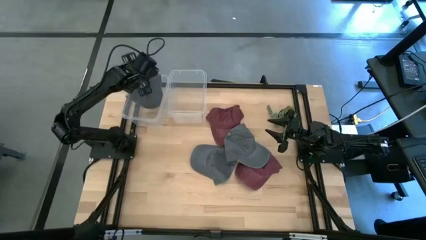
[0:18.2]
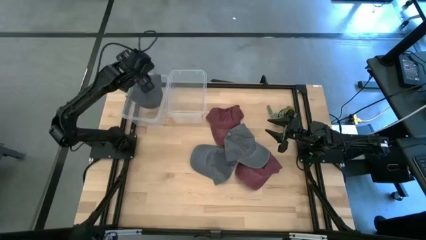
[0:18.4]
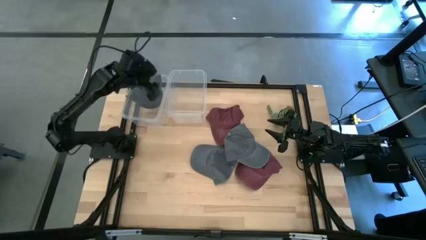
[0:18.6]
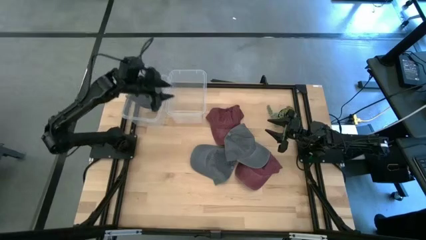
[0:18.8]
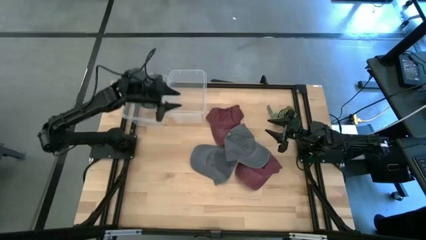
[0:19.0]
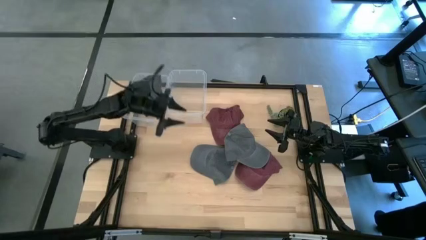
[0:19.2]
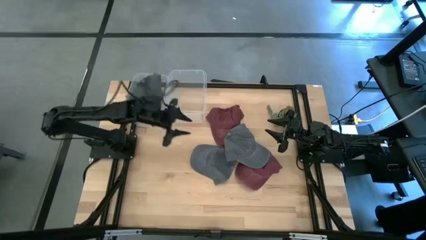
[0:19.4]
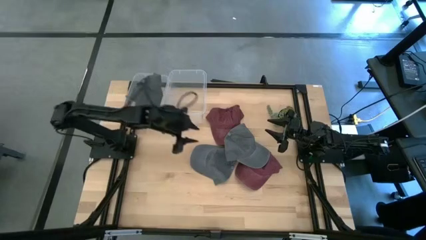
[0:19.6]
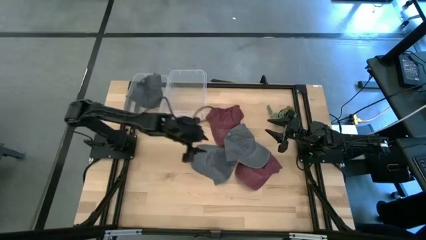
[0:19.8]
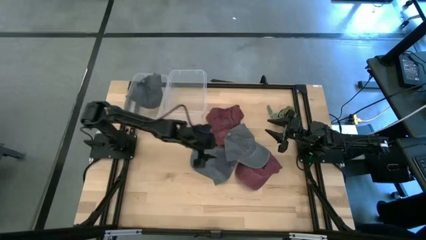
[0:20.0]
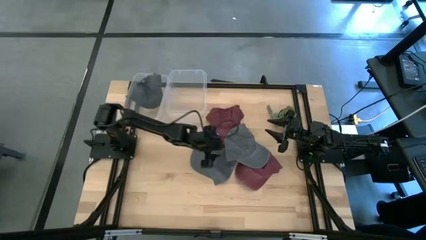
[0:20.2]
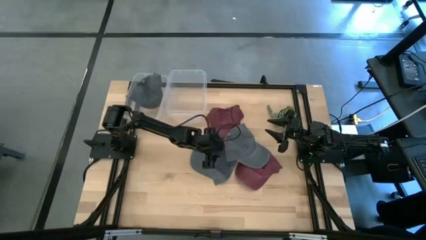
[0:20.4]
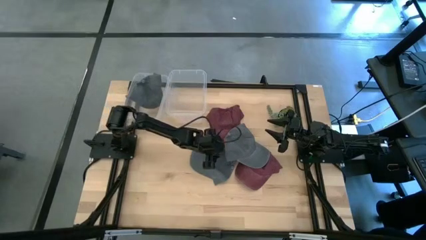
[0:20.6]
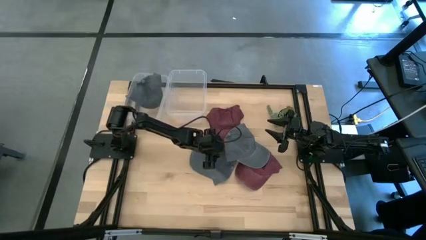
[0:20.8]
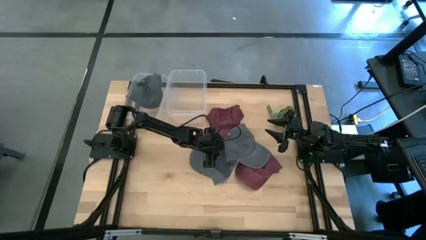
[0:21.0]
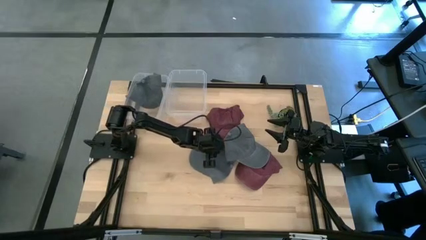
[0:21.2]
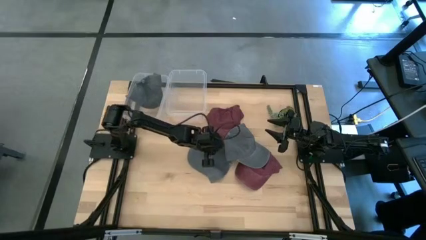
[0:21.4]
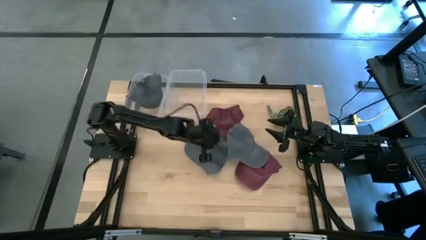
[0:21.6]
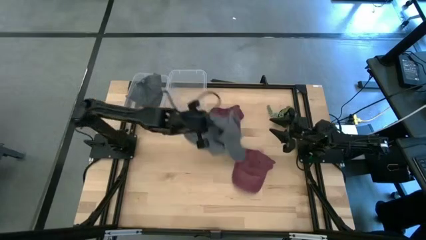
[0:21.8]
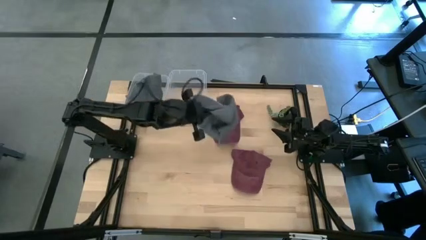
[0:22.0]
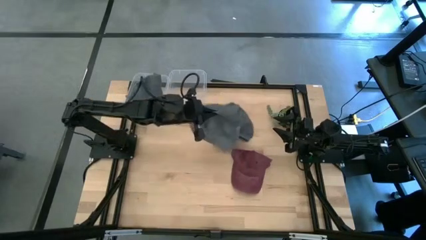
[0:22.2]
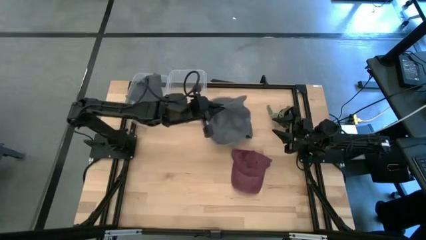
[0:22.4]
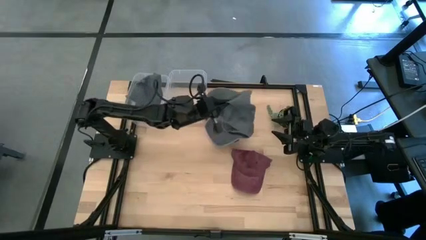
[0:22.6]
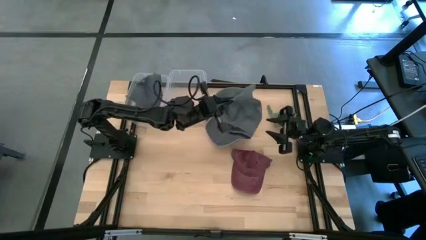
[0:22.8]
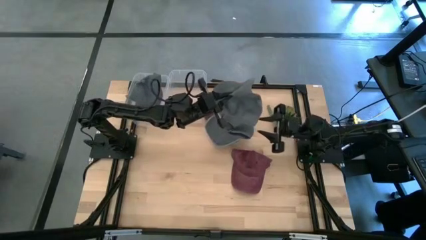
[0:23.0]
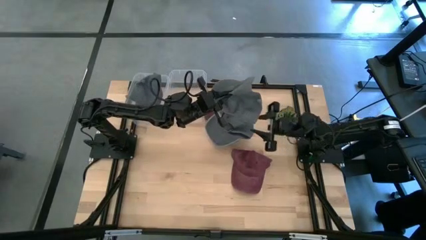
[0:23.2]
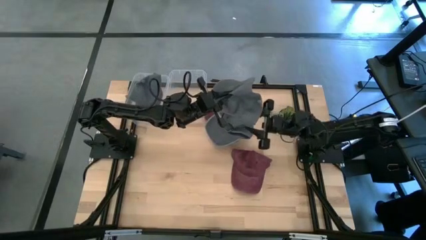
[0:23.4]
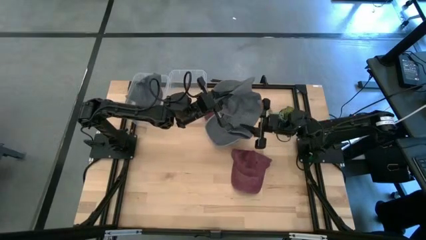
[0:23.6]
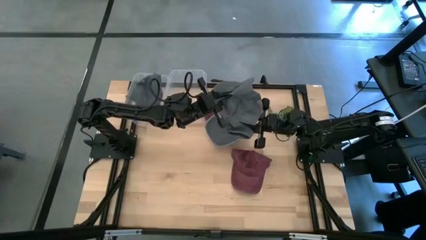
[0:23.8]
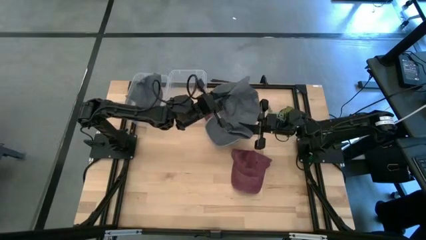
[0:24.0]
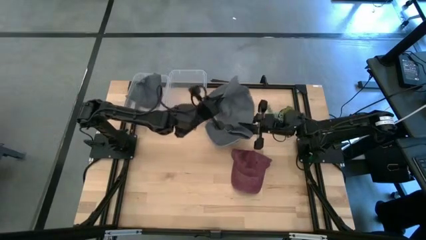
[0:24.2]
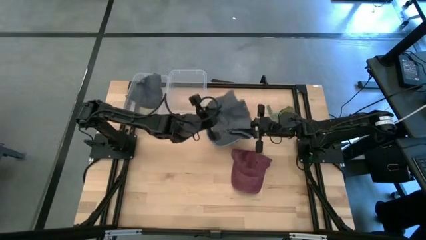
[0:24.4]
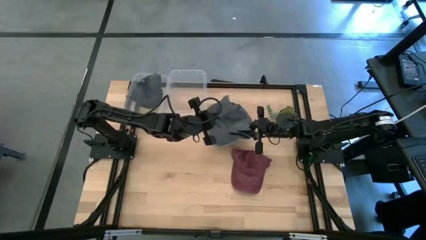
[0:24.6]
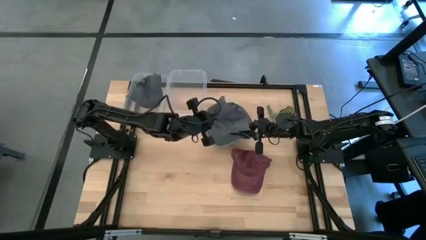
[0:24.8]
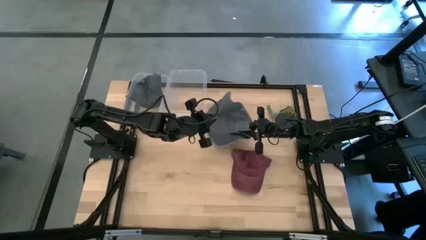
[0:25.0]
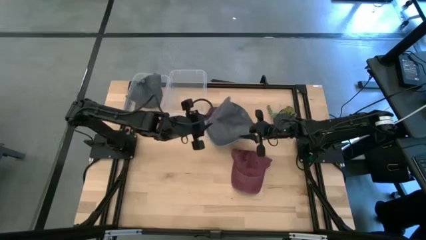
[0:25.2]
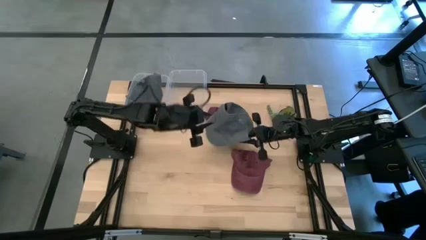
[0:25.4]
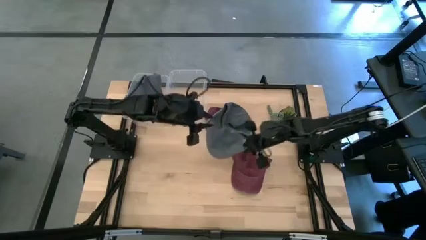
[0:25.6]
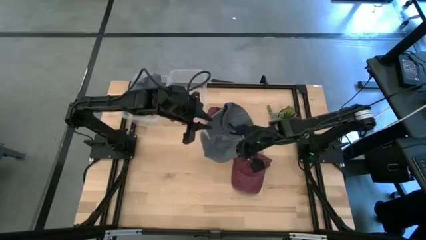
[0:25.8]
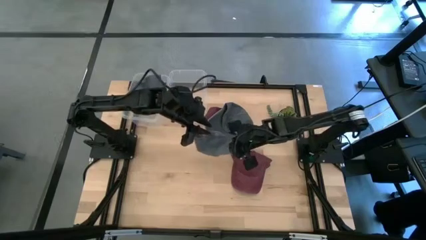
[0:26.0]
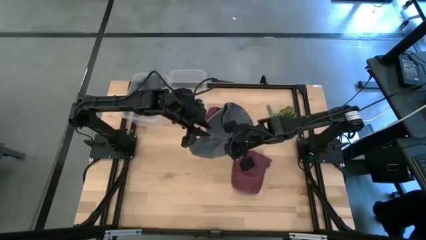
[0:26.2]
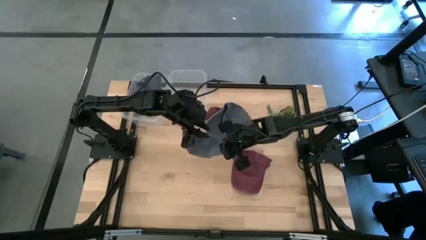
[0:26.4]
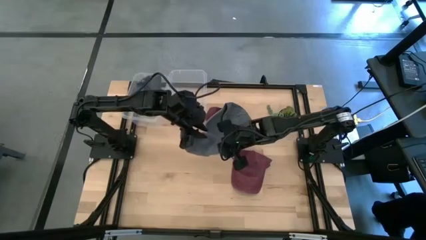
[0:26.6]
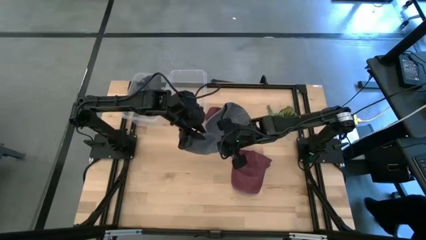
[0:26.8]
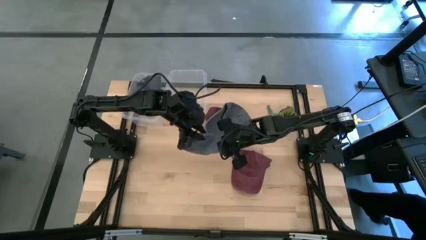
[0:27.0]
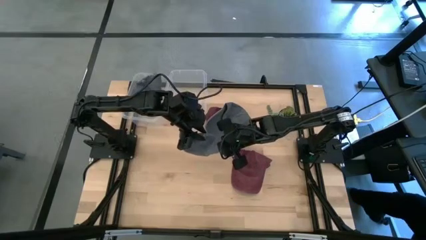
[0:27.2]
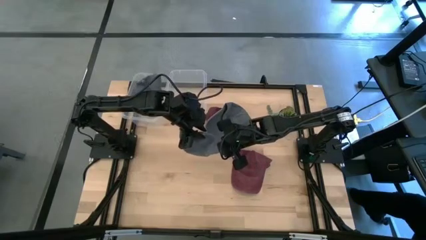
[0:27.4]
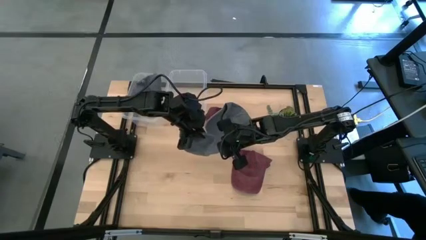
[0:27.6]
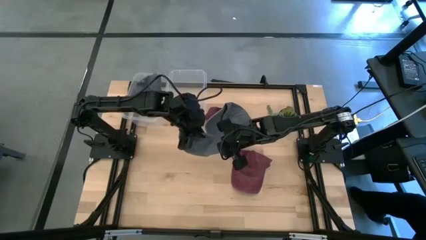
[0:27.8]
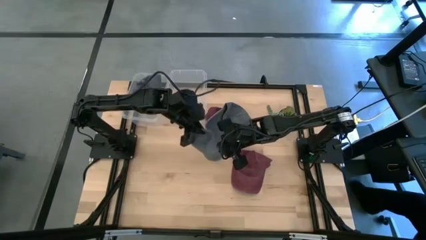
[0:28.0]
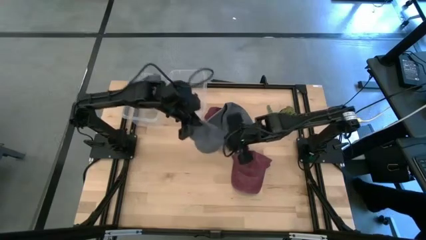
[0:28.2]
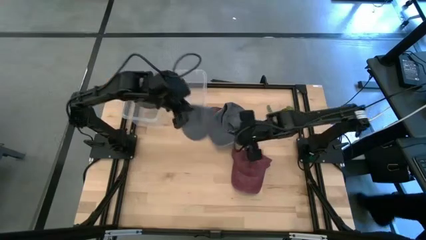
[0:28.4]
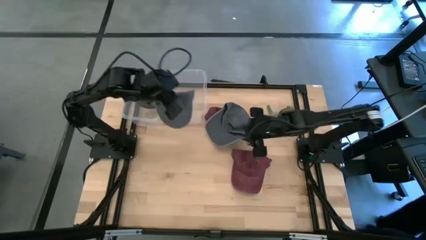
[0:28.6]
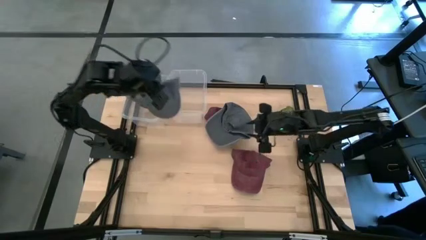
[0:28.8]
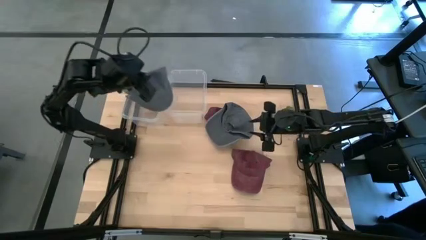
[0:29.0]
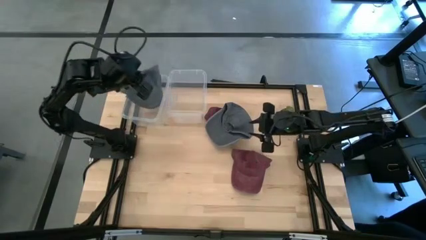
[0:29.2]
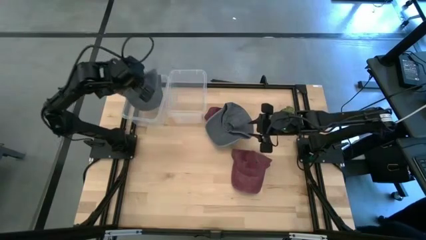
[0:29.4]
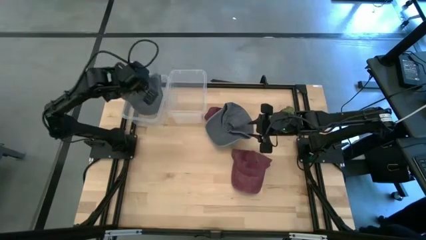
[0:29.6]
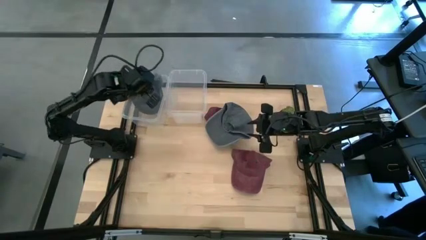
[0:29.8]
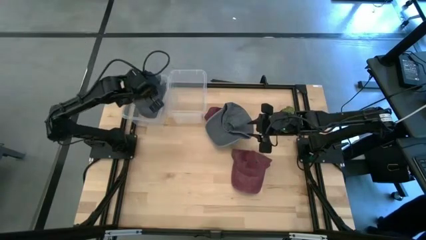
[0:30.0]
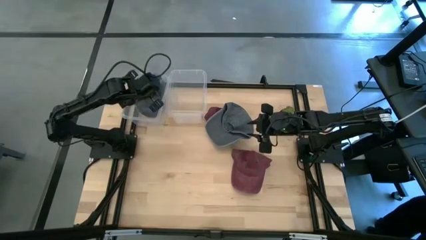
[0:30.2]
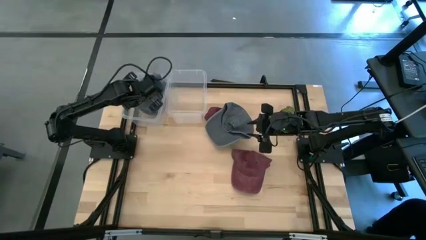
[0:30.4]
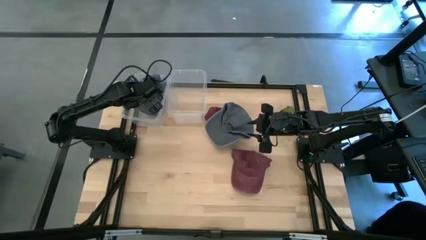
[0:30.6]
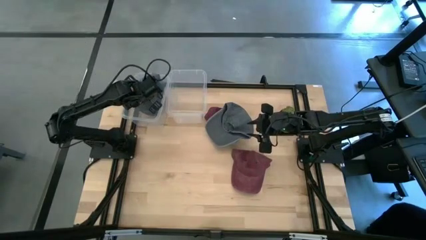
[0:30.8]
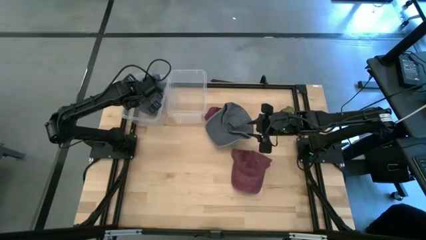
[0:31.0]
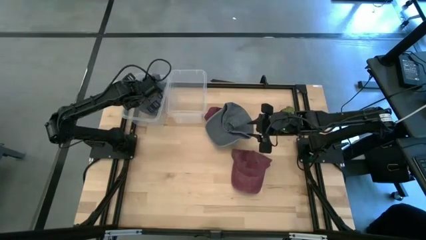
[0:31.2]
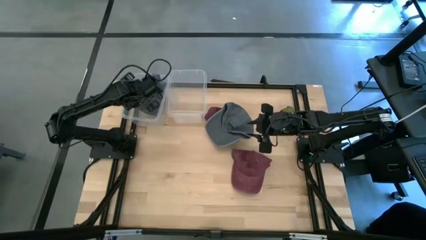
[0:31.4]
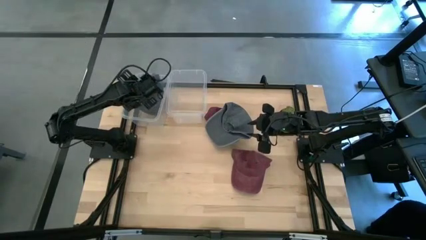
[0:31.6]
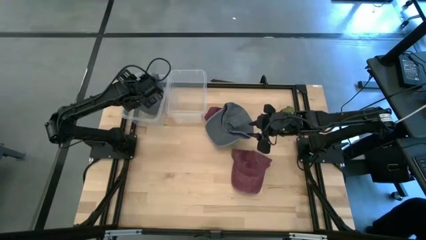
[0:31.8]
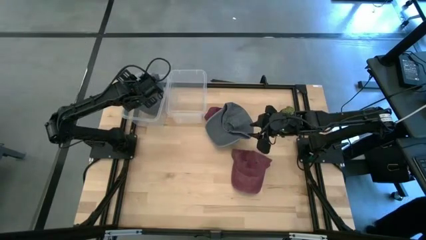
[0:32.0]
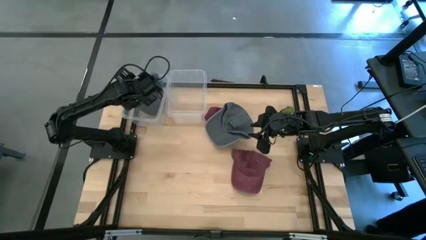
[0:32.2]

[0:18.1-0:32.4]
Task: Pick & Place hat
Put the bottom gray cap into the left transparent bin

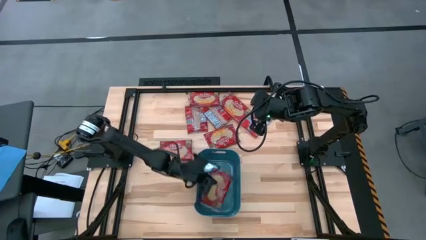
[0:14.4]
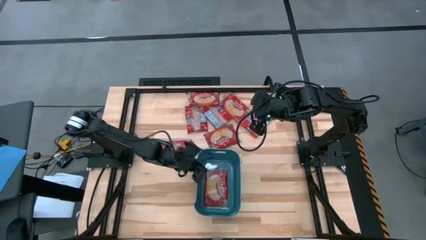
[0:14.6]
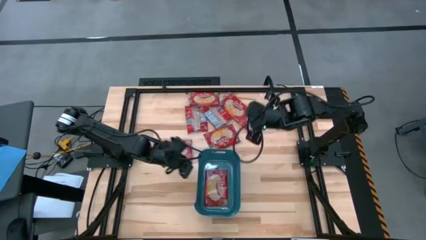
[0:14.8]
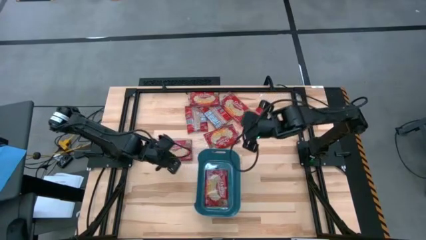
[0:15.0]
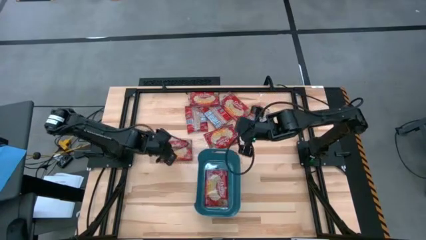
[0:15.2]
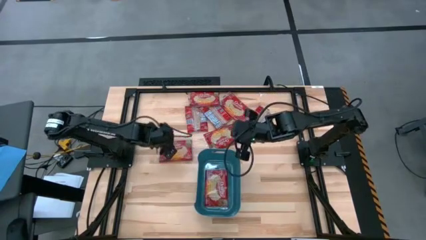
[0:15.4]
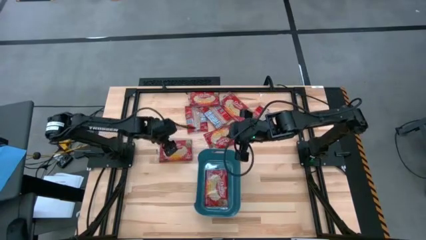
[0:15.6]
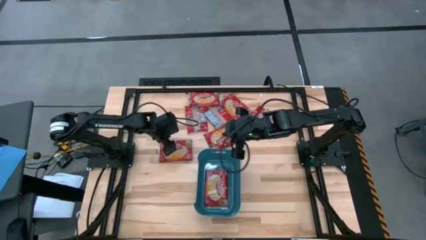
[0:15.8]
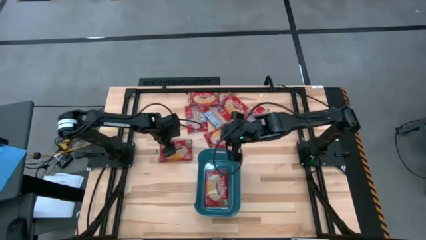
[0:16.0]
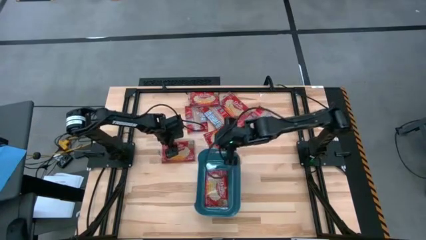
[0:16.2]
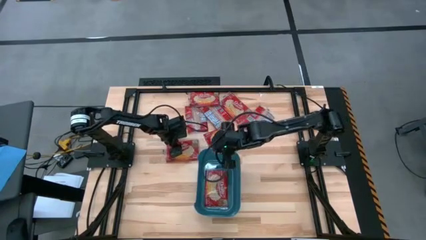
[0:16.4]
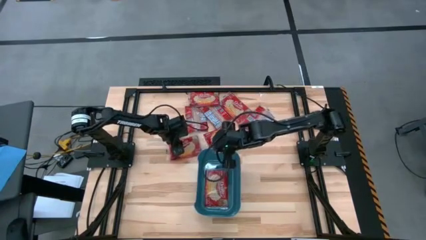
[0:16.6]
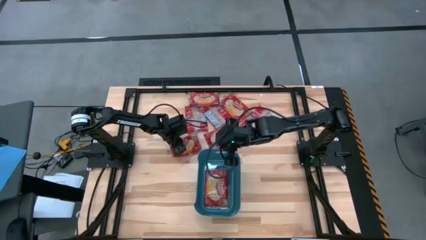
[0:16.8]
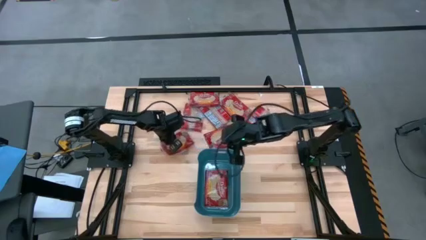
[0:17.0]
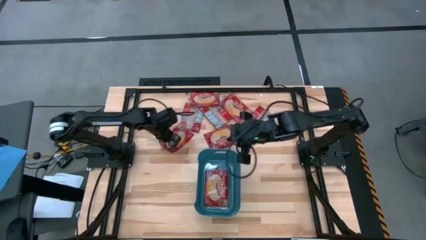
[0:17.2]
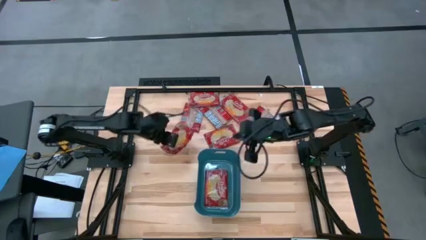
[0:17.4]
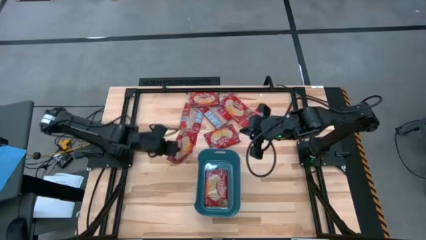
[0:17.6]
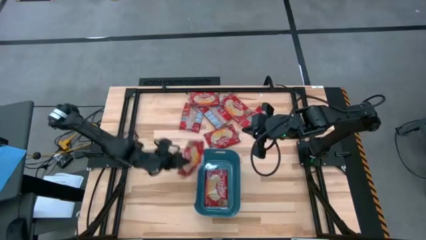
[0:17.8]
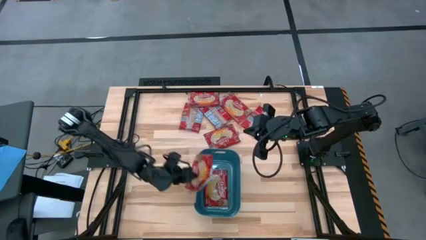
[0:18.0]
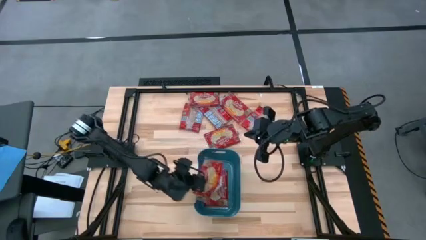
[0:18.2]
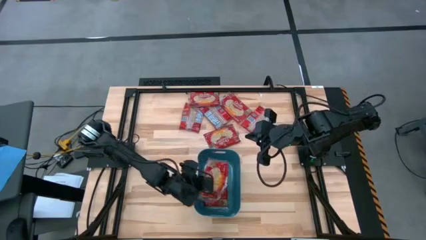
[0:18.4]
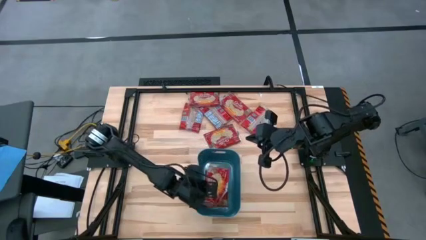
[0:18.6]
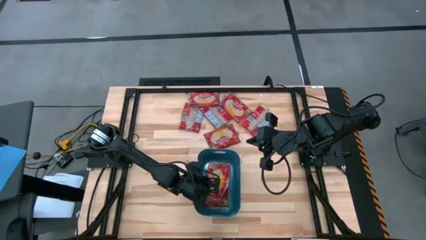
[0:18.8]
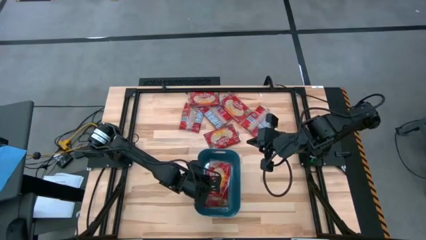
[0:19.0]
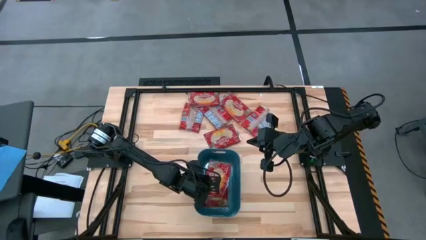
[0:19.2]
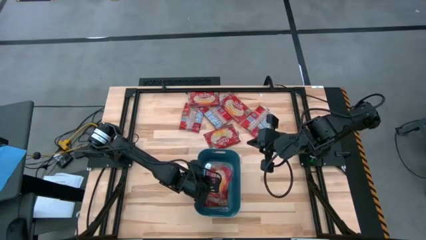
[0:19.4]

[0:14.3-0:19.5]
Task: Sort popcorn bags into baskets
Put the red popcorn pack into the blue container
